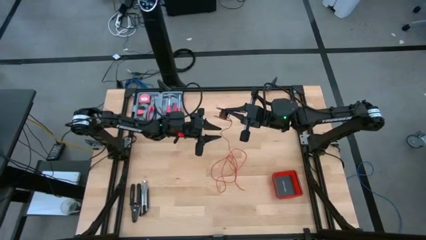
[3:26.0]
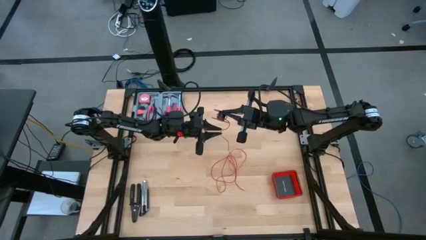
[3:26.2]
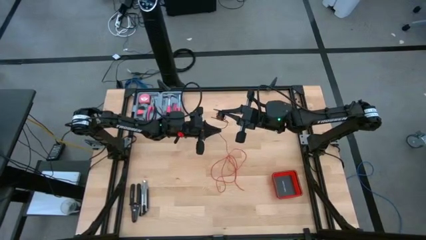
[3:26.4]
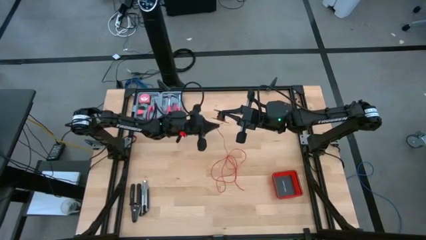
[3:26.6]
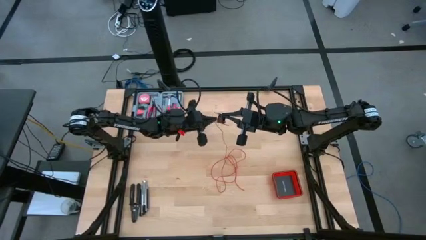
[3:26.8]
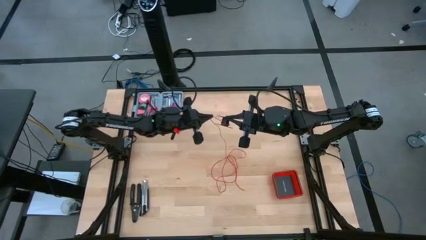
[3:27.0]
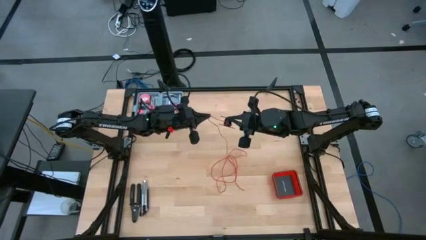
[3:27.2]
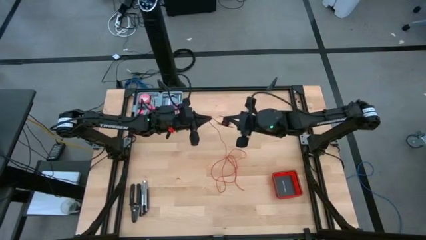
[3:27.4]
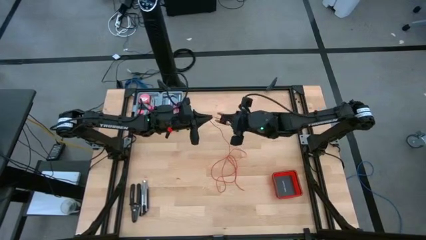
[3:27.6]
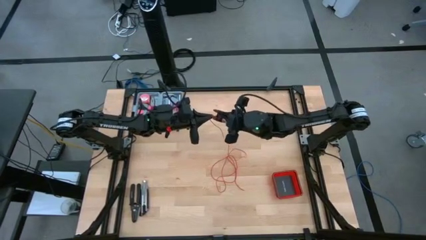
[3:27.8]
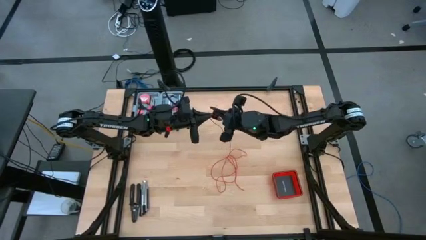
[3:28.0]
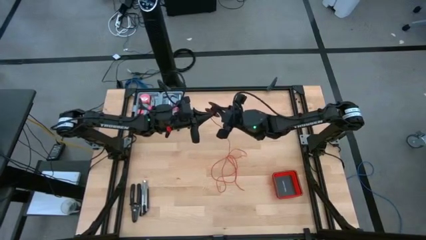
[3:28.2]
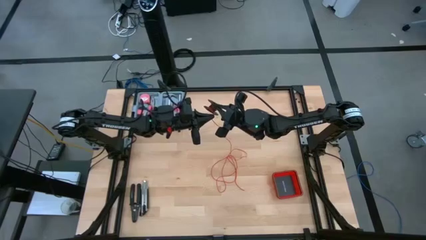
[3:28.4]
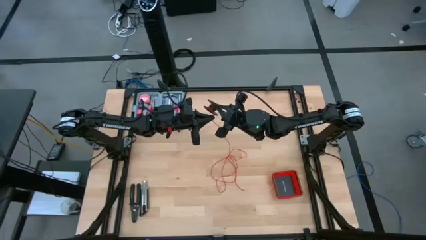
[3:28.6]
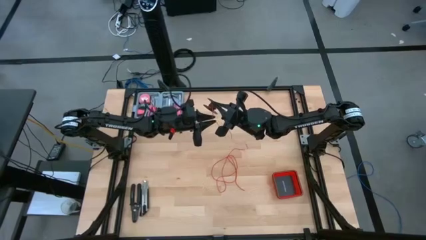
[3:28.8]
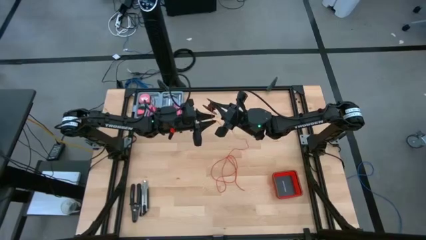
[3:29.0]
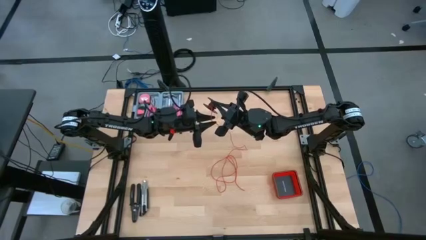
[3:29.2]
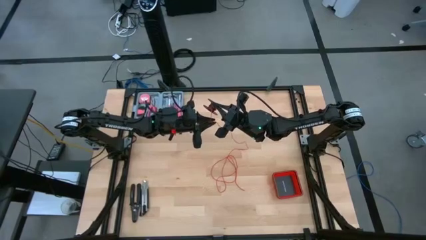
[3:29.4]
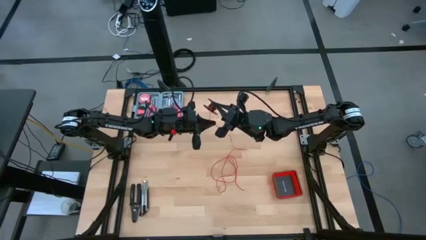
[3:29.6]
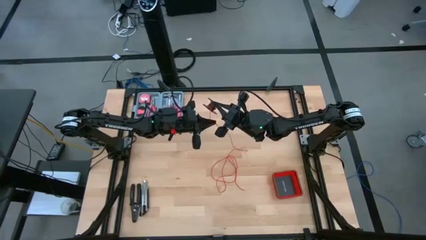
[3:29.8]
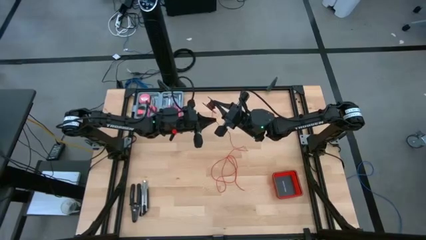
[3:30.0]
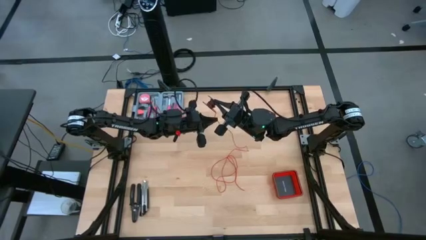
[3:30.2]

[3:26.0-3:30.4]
Task: Coil cords
Coil the red wire onto the spool

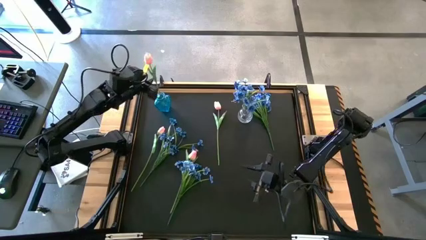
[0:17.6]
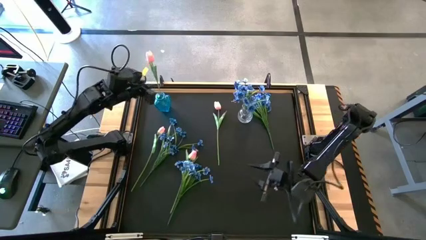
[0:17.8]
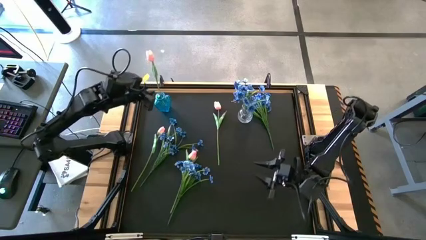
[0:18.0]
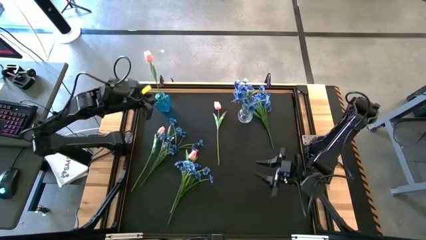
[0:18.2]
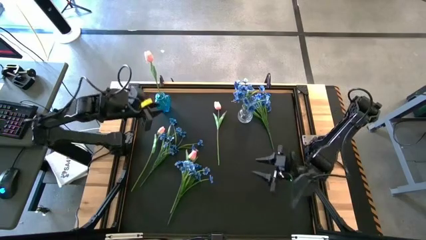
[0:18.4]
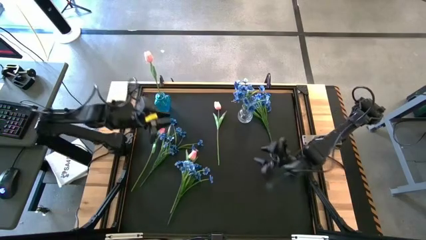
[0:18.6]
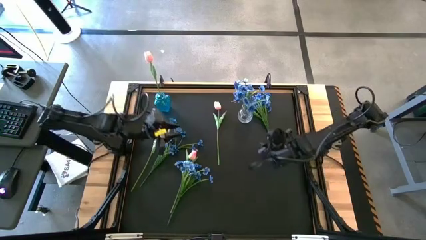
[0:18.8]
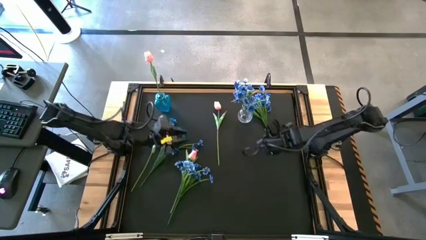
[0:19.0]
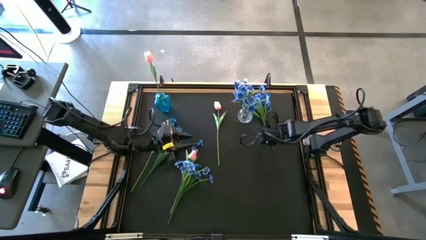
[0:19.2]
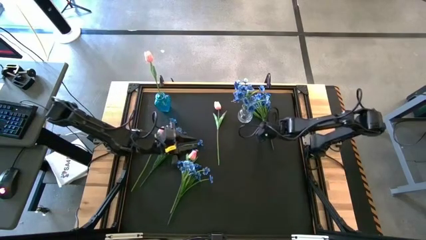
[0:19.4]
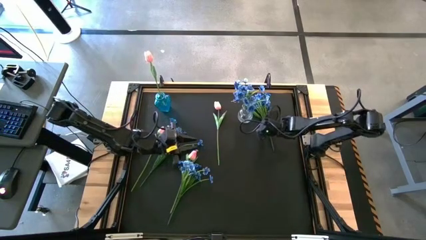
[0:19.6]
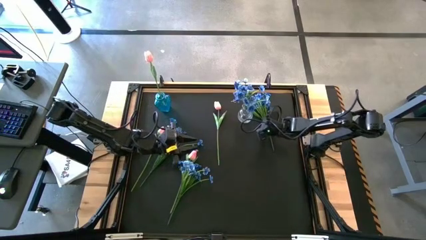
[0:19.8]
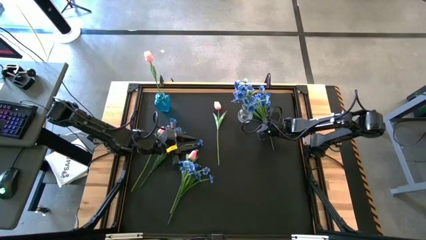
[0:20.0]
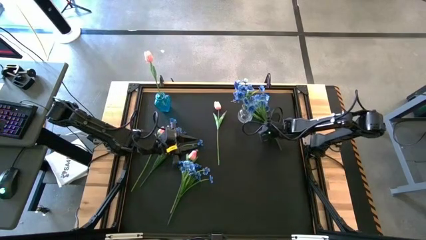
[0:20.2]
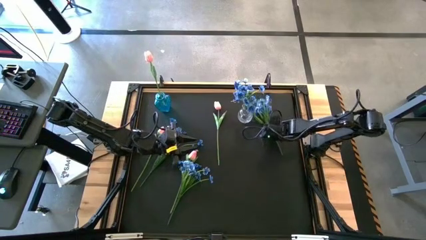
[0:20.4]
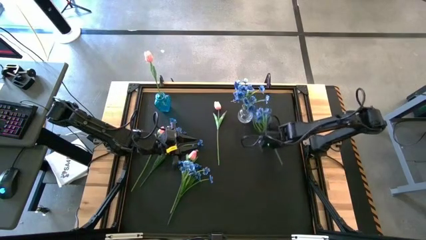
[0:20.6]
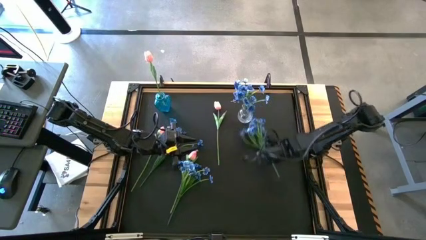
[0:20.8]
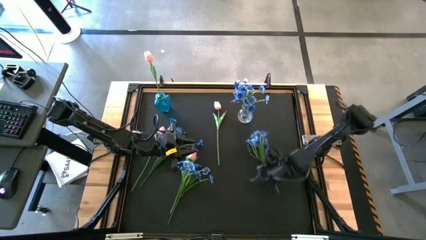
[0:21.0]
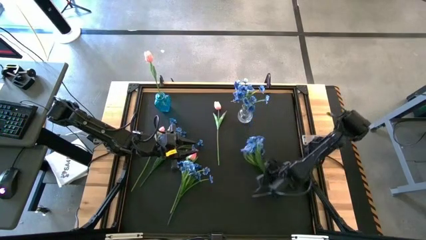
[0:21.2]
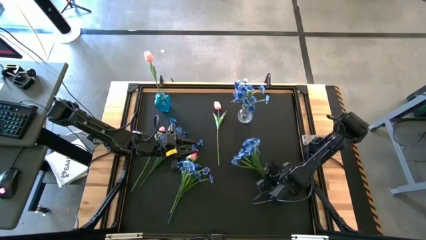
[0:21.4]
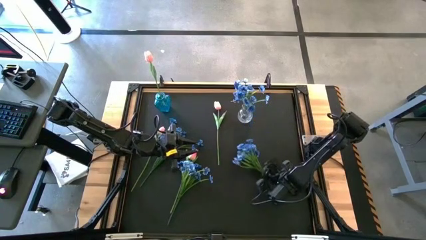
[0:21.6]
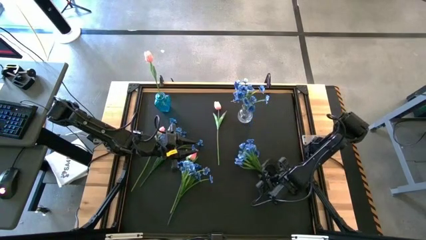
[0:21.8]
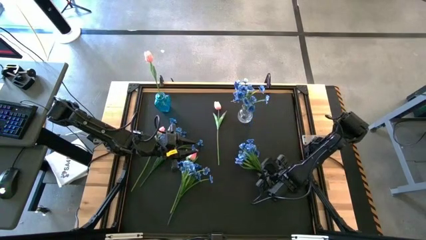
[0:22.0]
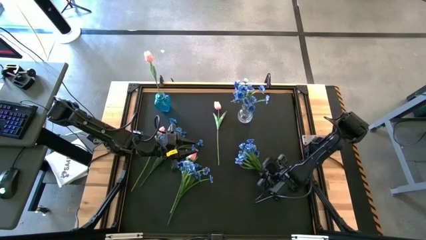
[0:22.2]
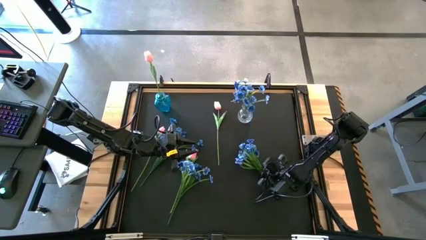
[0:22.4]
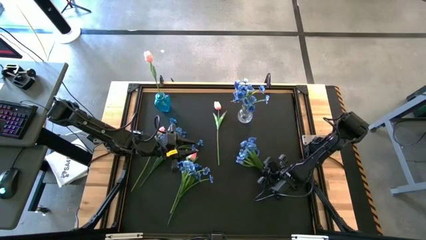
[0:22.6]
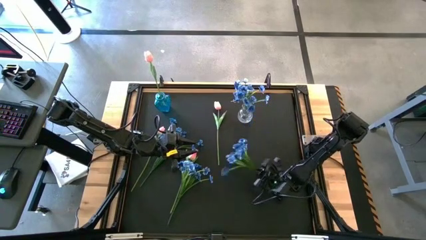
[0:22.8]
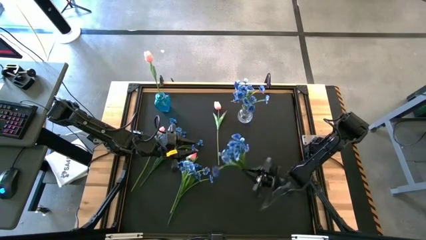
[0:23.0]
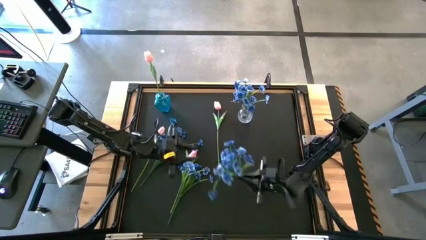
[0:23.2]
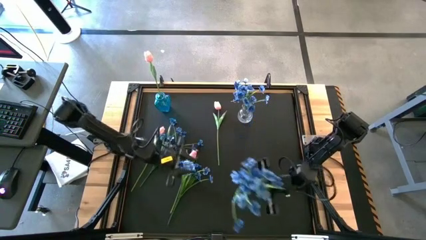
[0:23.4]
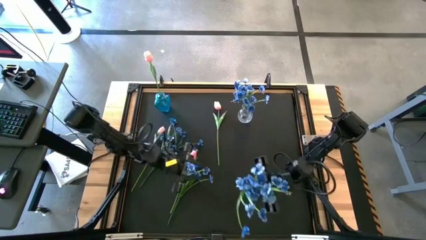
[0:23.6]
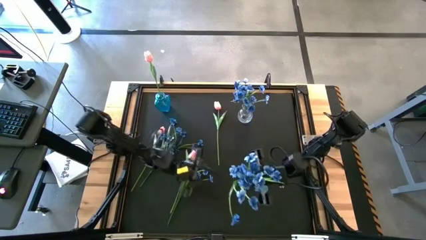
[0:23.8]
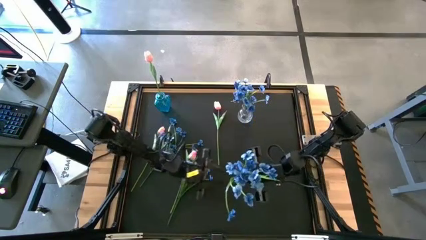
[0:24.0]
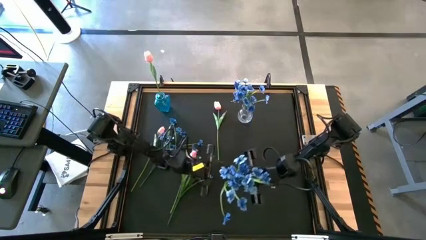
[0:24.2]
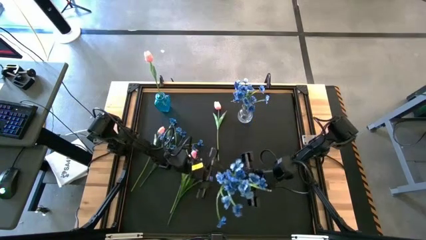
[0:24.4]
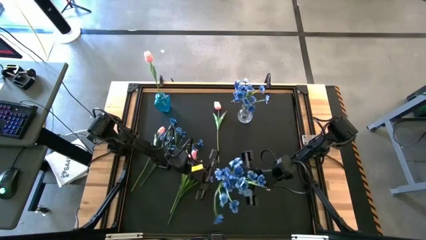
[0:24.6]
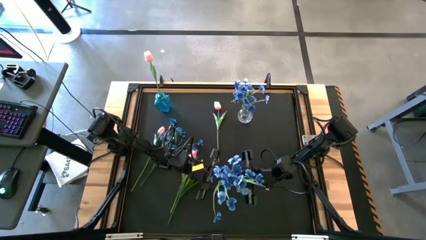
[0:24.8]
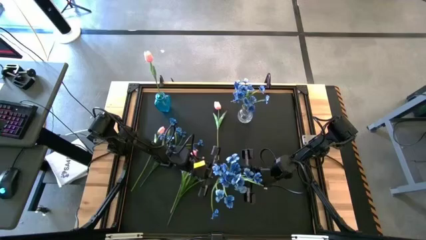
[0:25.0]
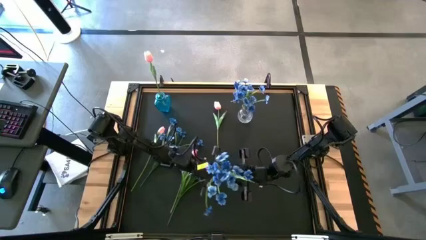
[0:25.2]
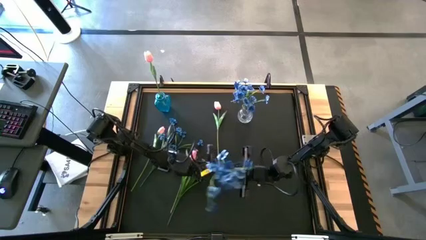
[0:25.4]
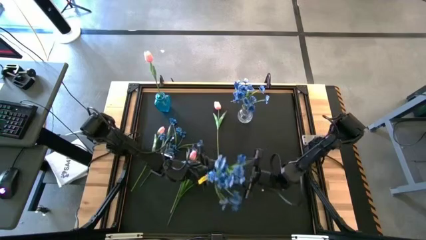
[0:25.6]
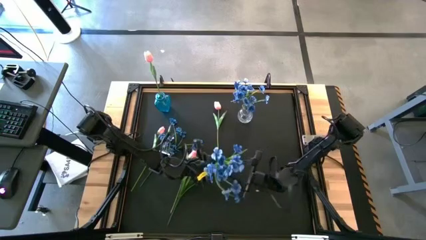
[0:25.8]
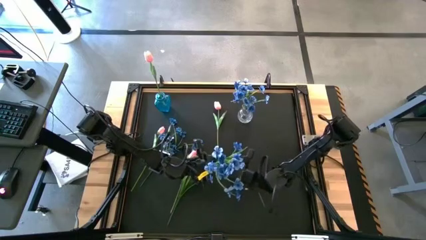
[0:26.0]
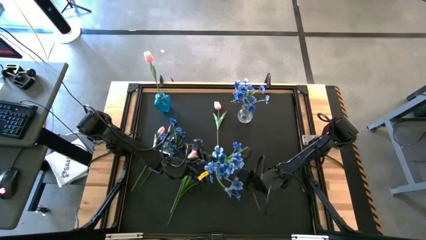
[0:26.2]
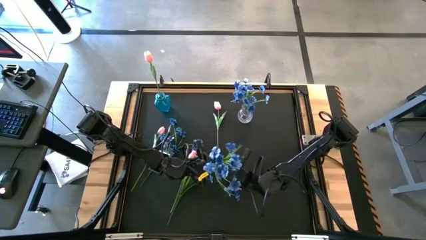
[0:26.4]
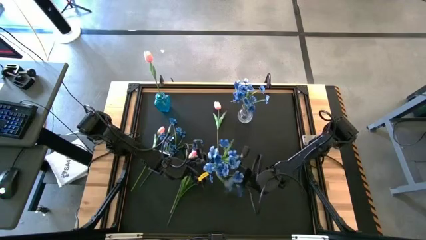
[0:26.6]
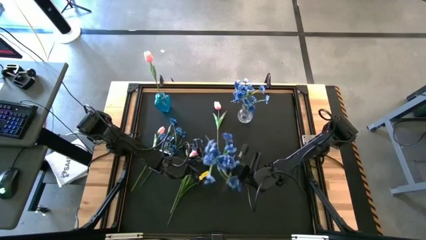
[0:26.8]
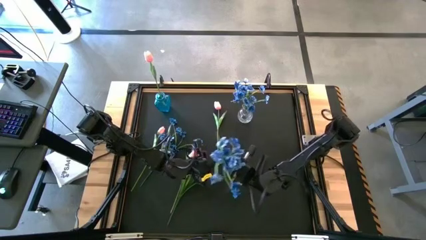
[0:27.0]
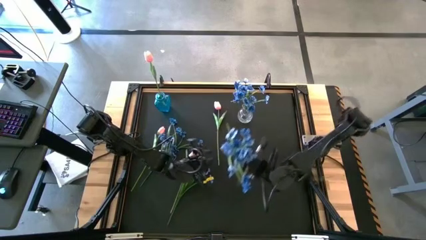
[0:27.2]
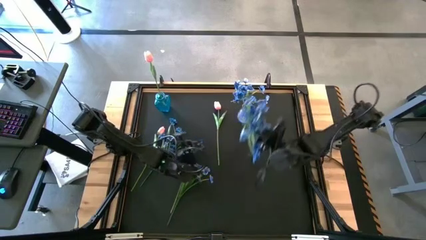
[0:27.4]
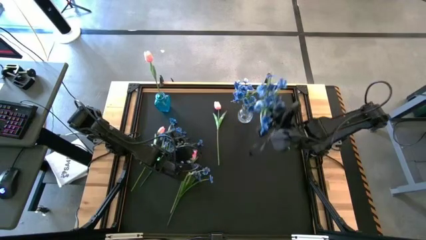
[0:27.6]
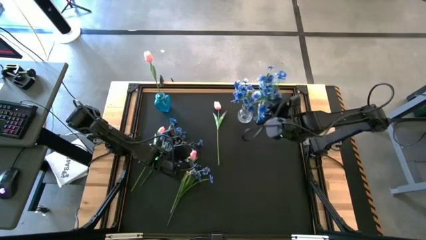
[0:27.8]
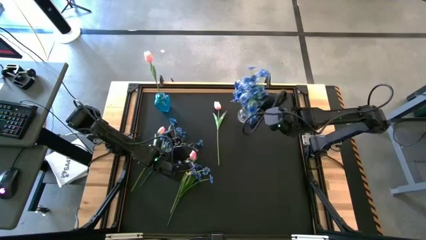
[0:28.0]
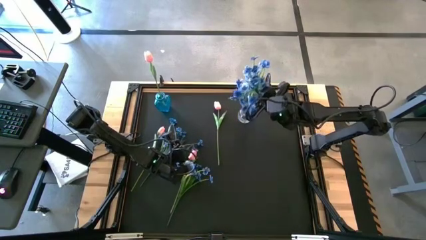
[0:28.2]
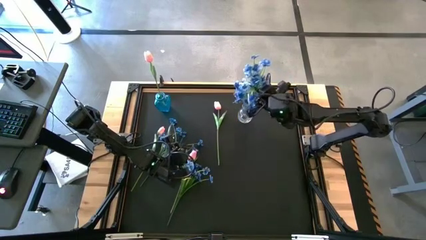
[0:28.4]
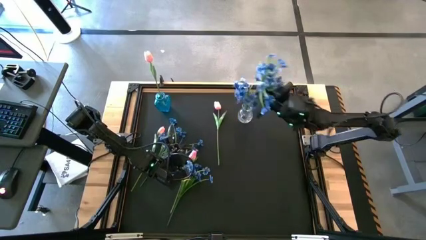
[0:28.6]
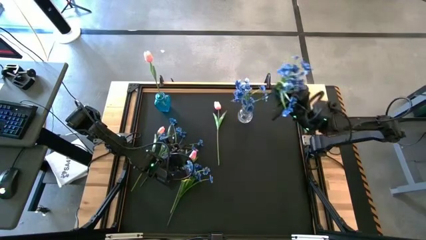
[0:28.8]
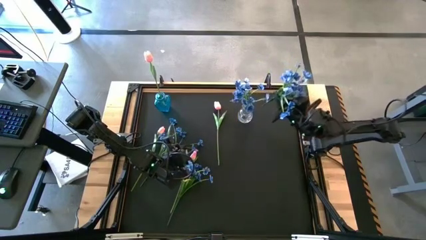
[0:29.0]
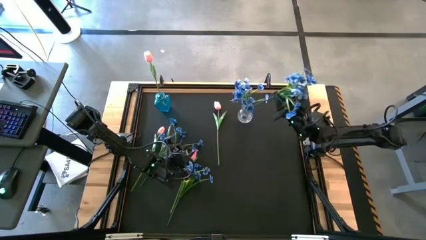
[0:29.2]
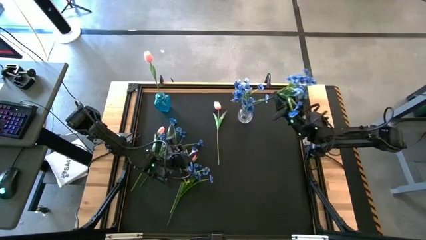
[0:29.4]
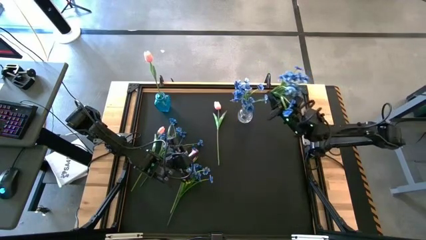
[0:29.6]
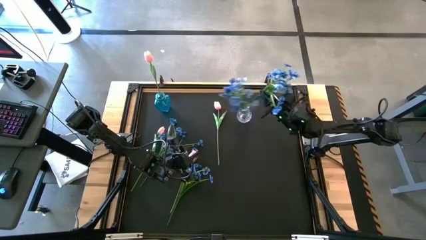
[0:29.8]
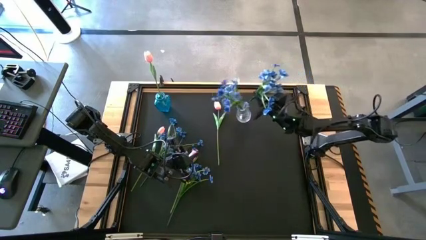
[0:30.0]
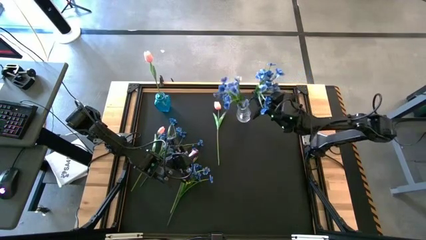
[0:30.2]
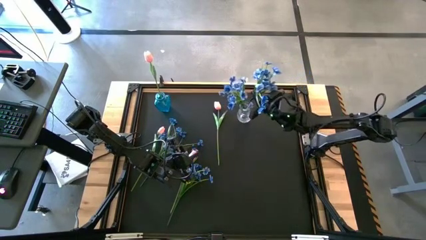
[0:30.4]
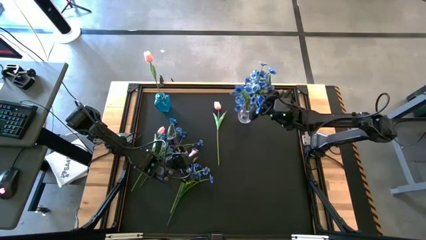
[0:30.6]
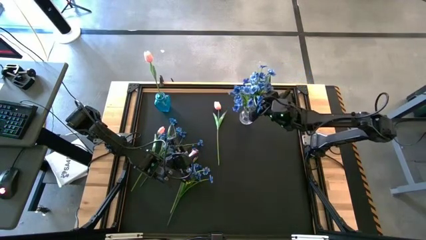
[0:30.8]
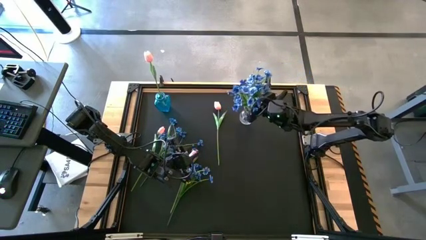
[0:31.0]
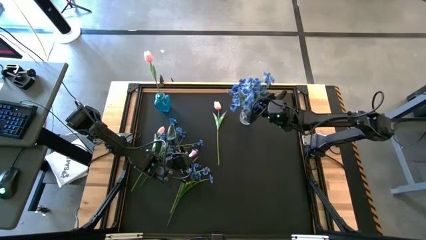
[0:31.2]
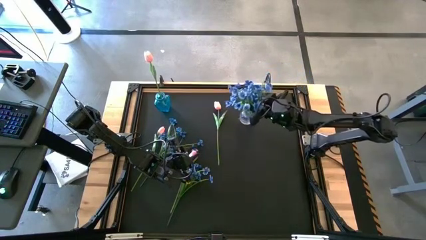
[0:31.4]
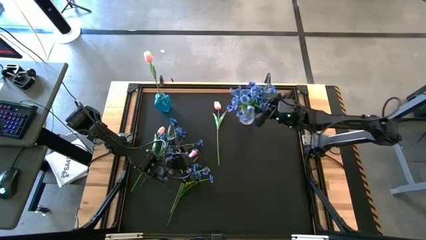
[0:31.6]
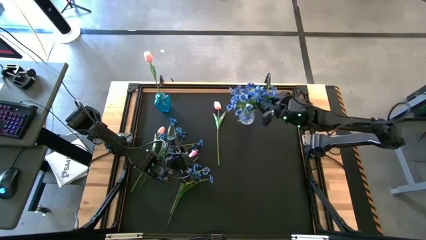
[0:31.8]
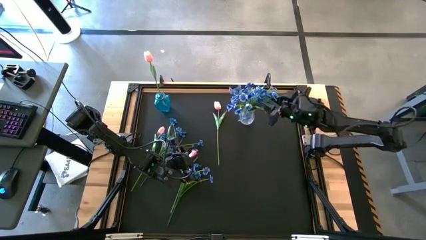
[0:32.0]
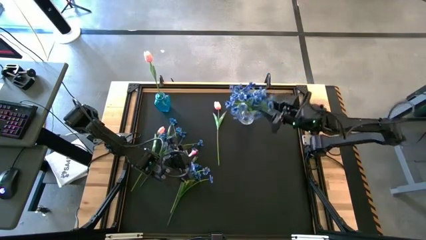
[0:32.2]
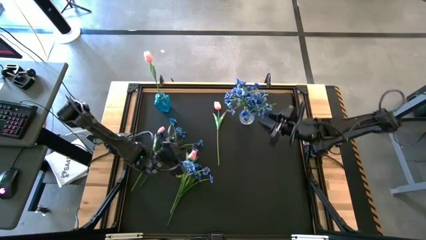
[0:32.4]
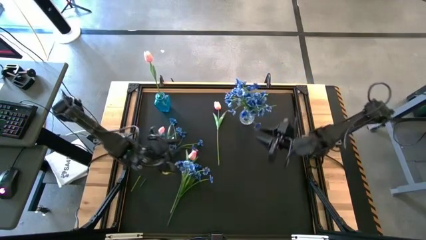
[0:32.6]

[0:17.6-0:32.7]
Task: Sort flowers into vase by color
Put the blue flowers into the transparent vase
